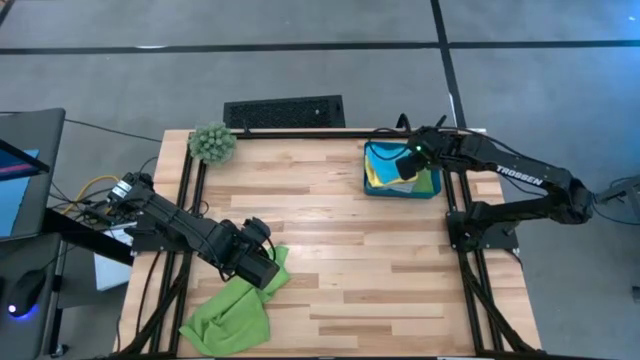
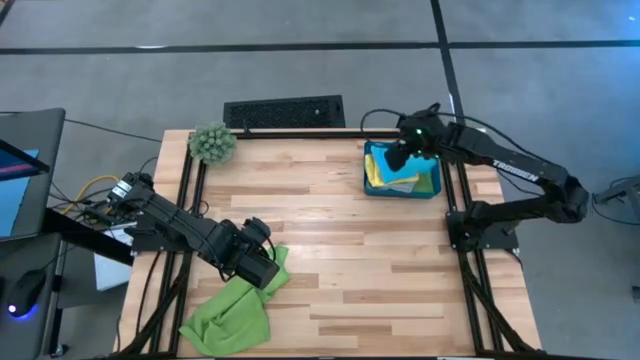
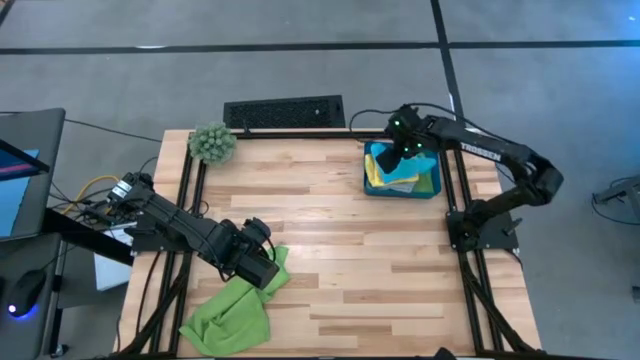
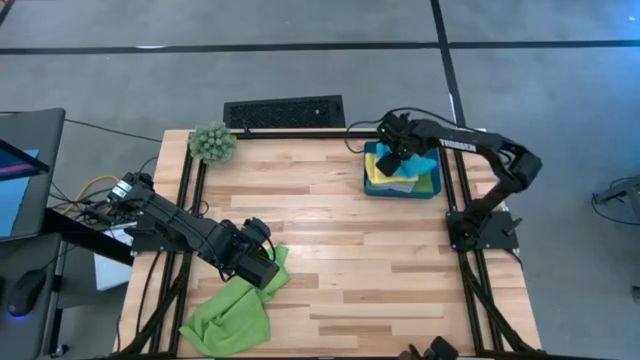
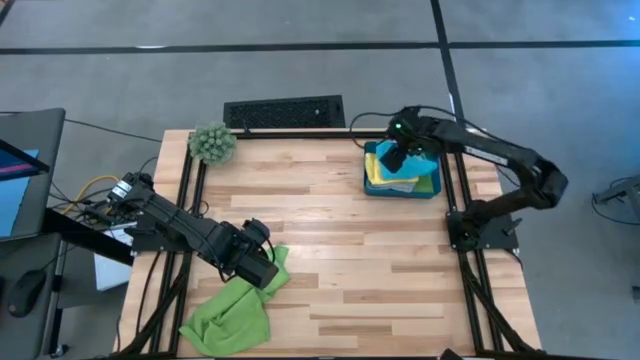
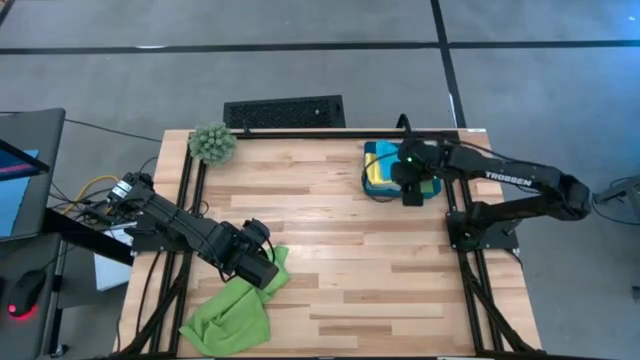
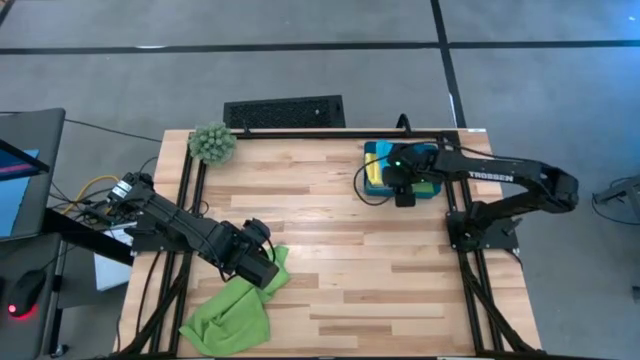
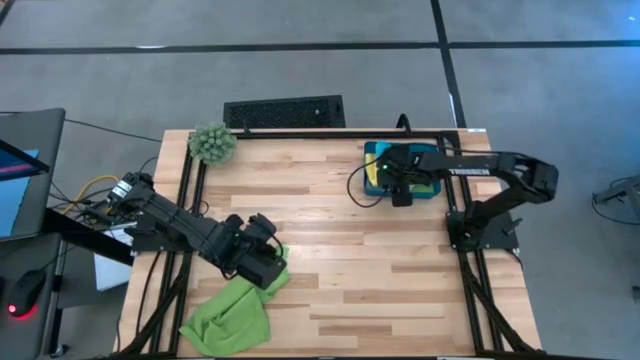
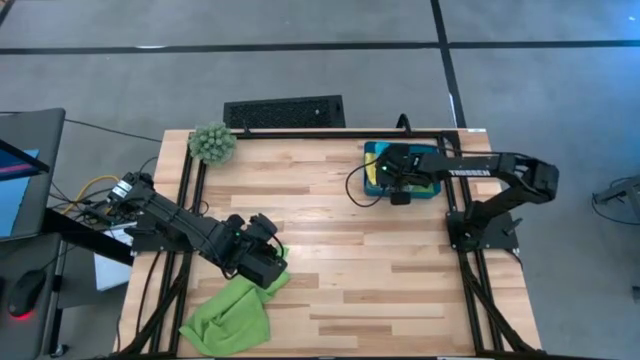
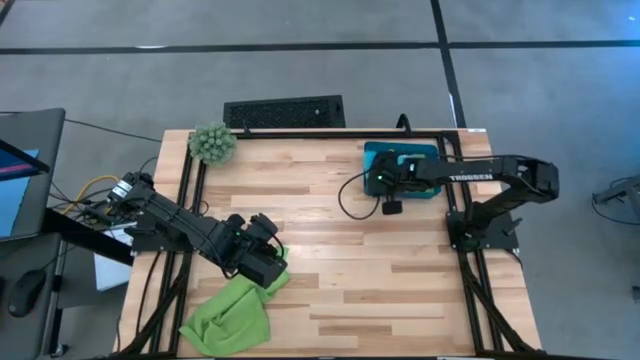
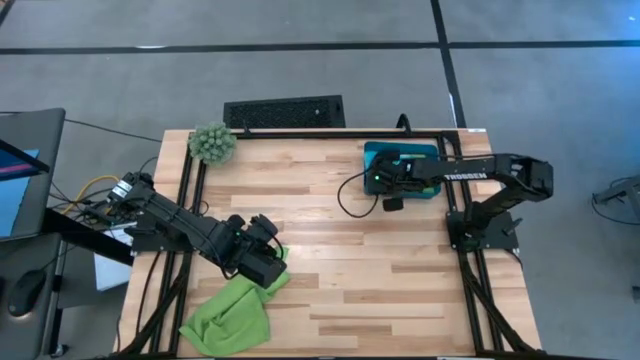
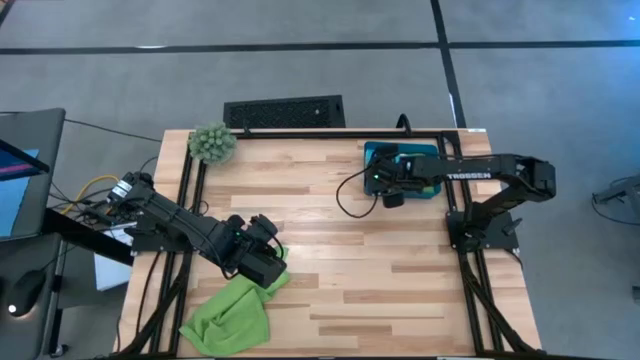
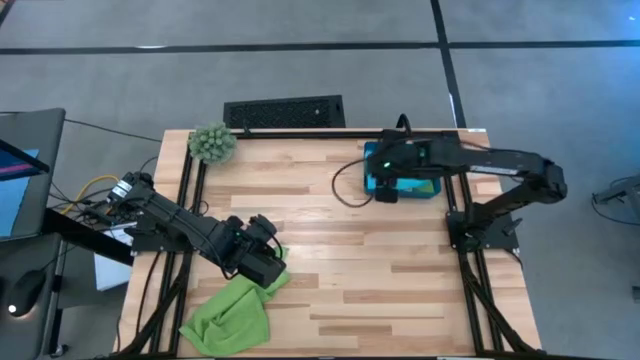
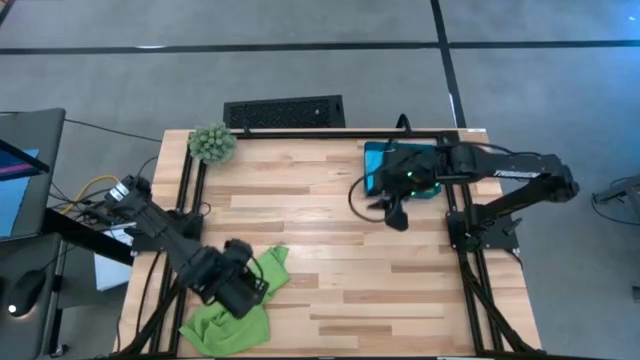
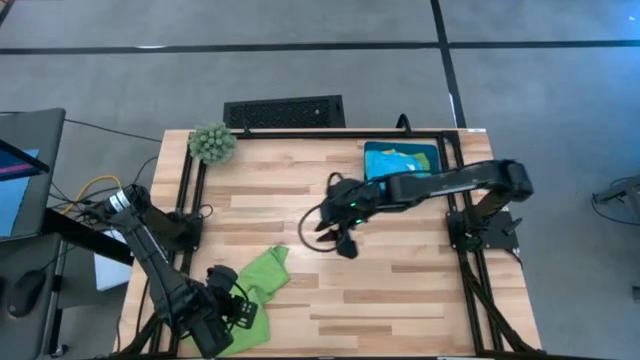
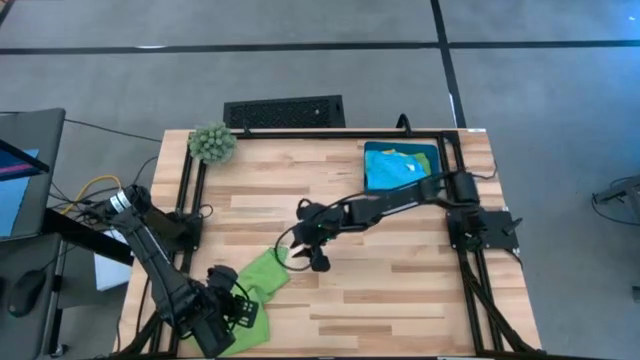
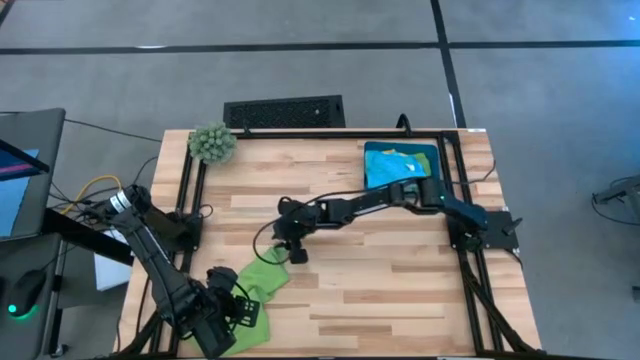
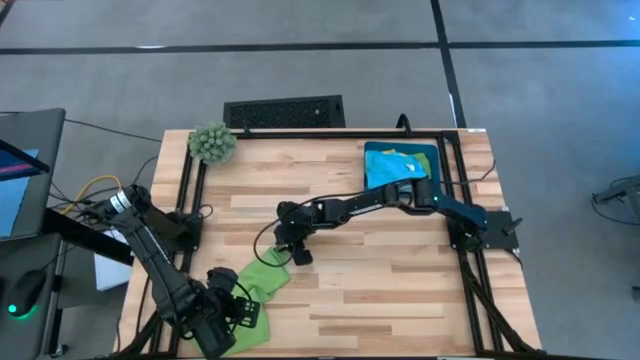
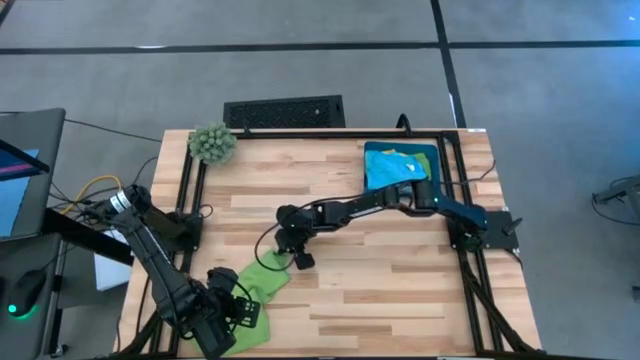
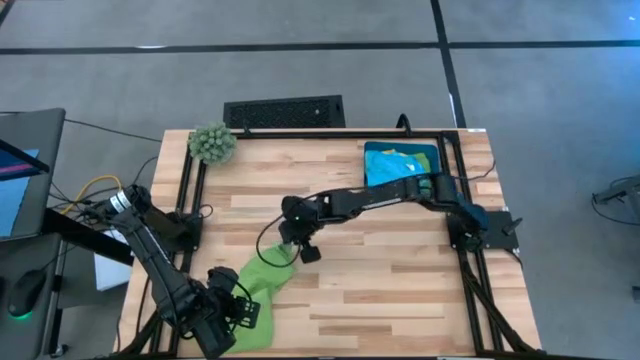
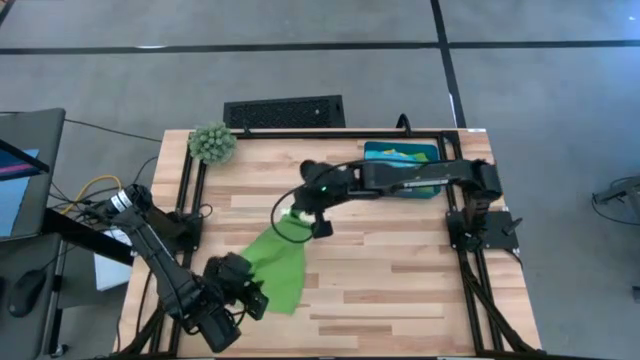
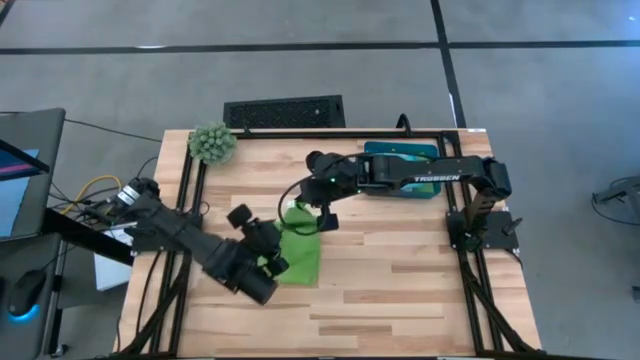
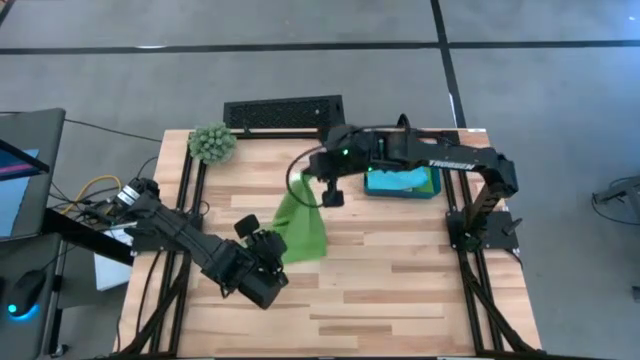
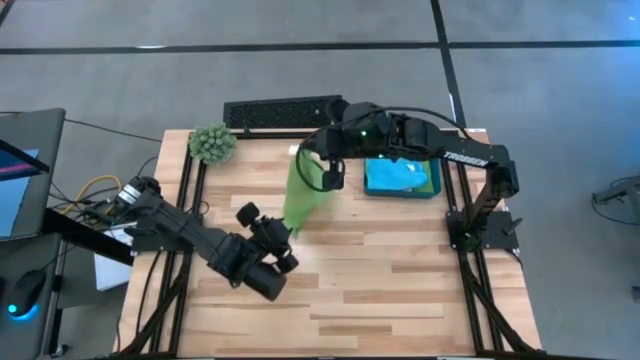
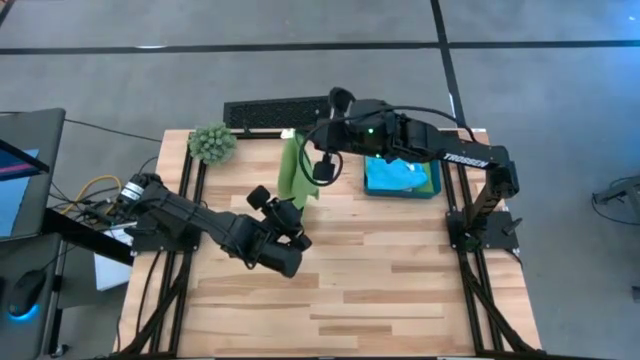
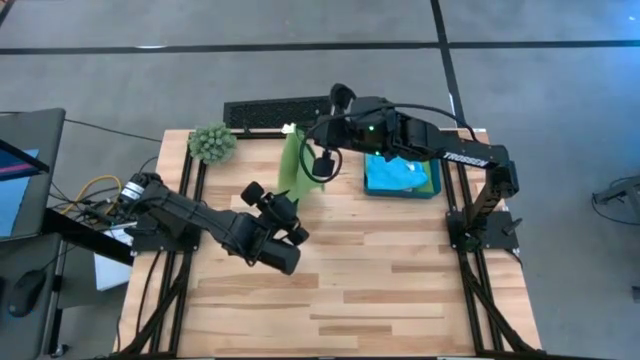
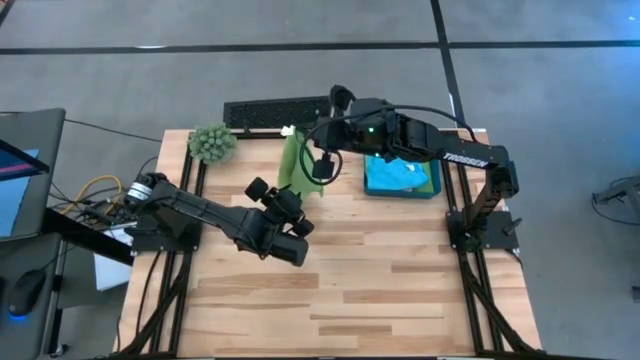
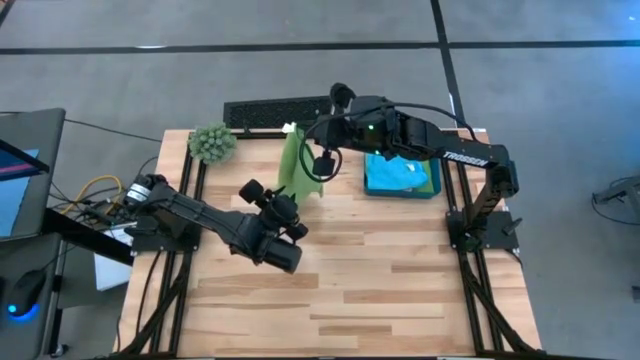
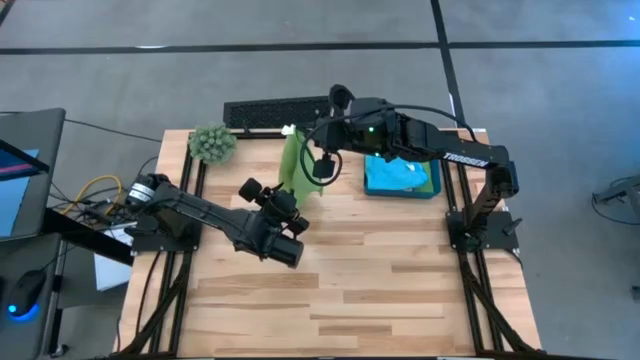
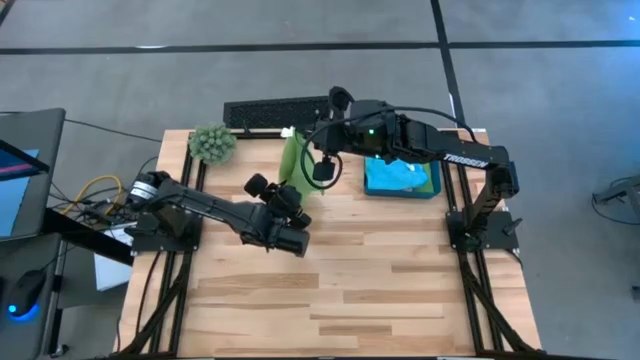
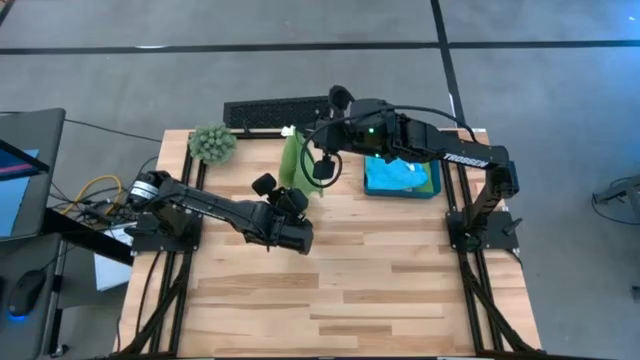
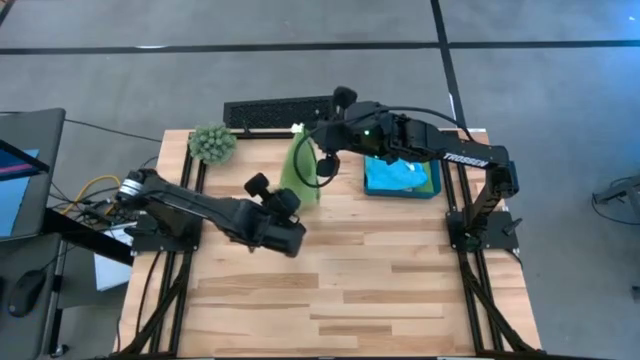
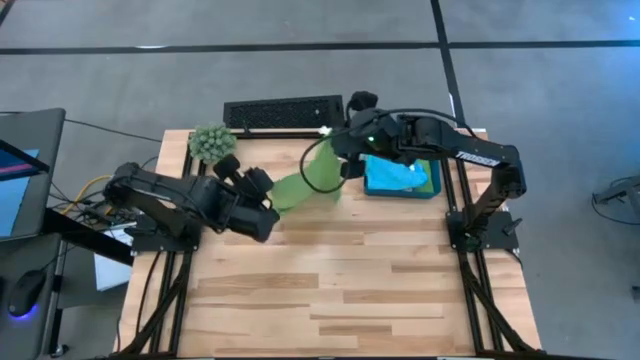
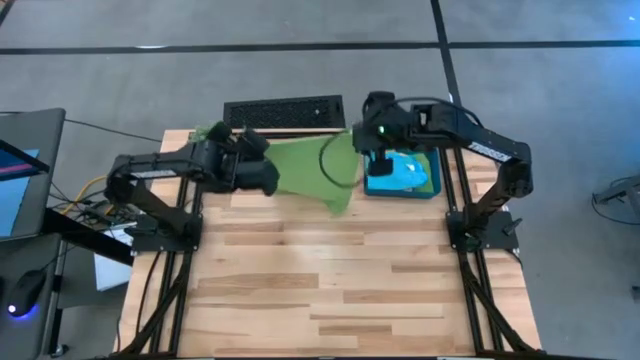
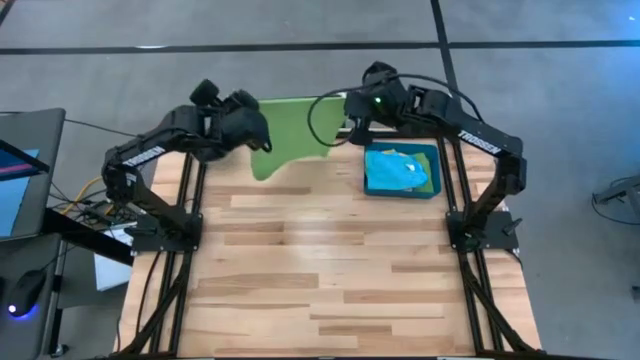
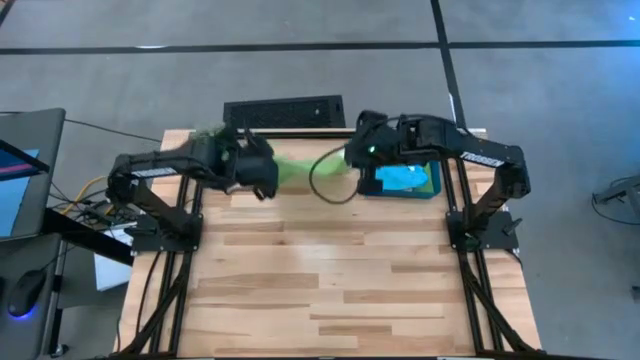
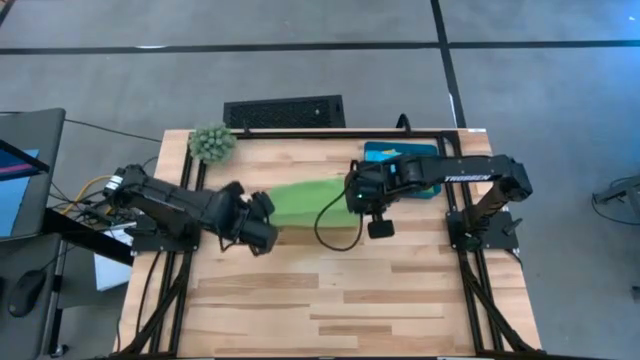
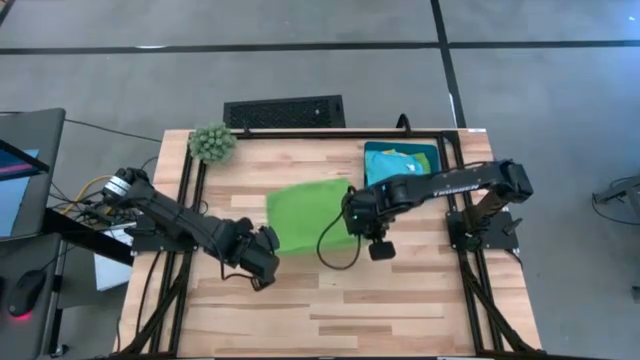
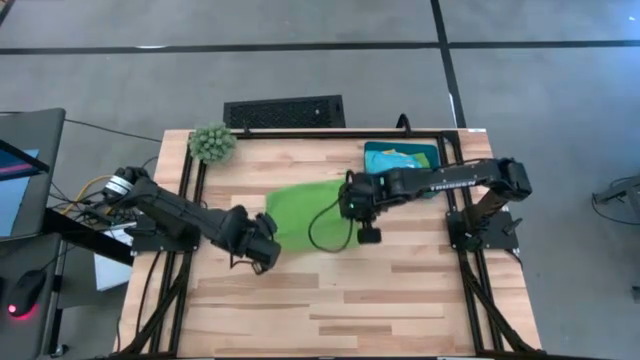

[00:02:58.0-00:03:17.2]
Task: Fold microfiber towels
Fold the green microfiber cloth

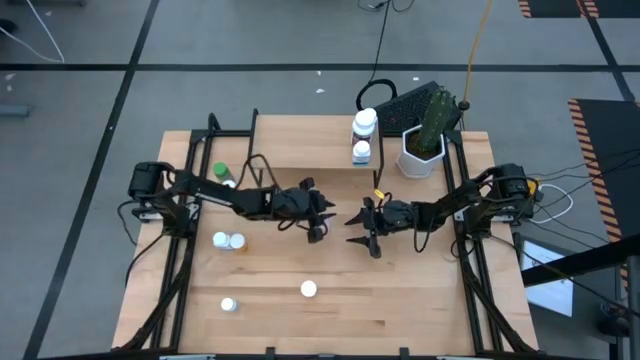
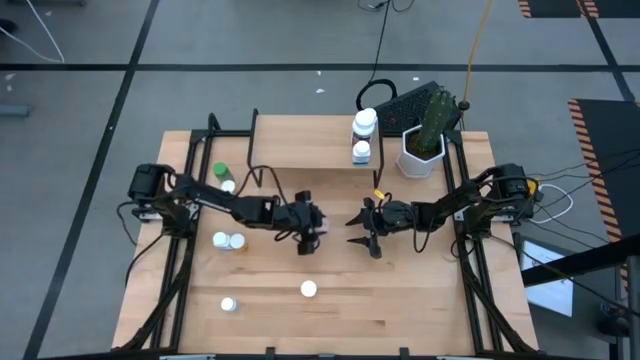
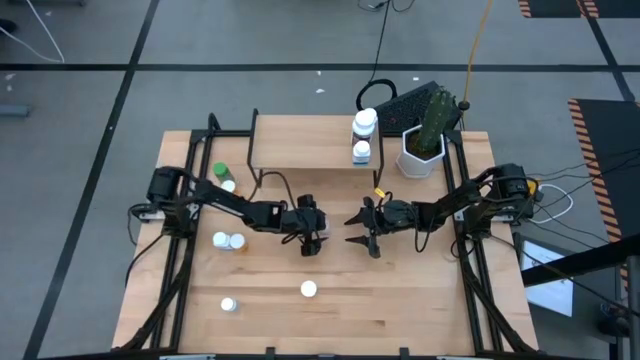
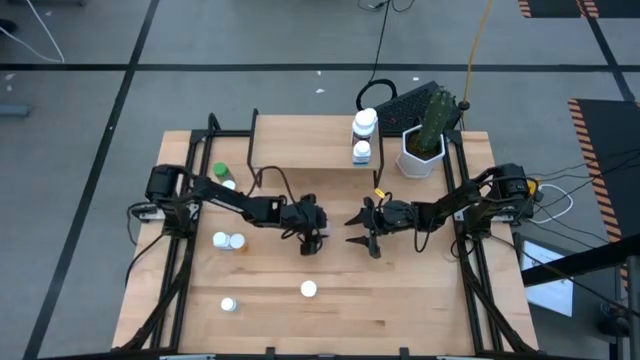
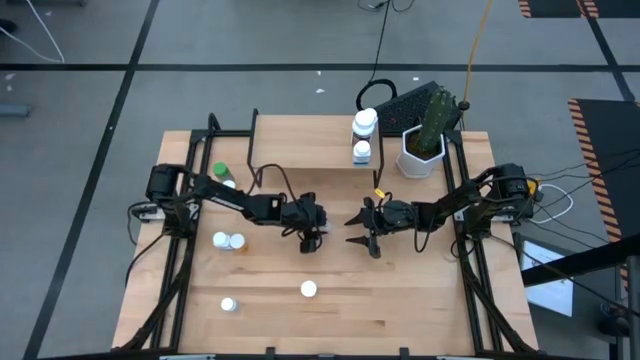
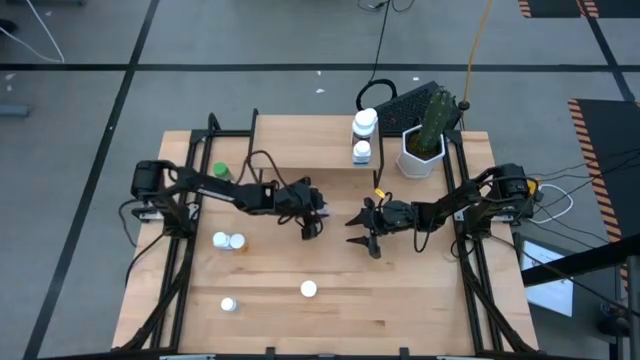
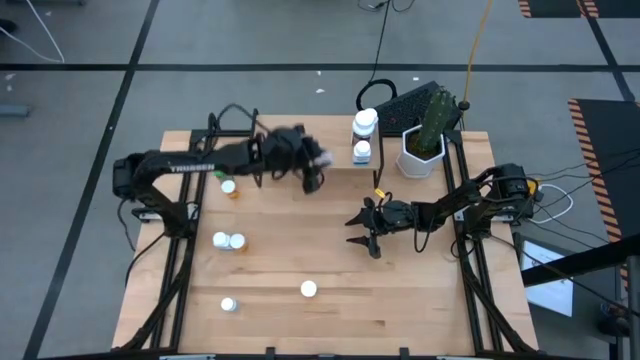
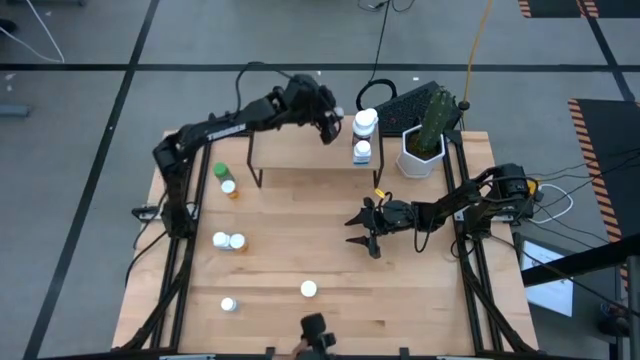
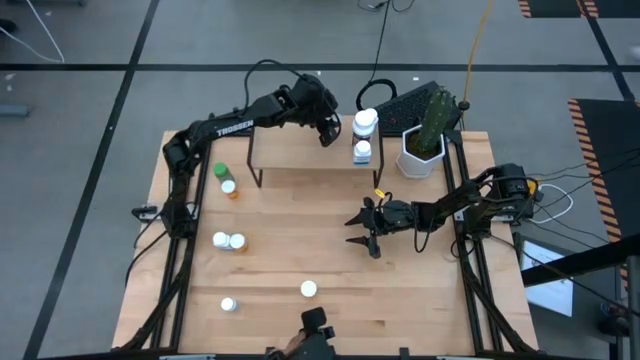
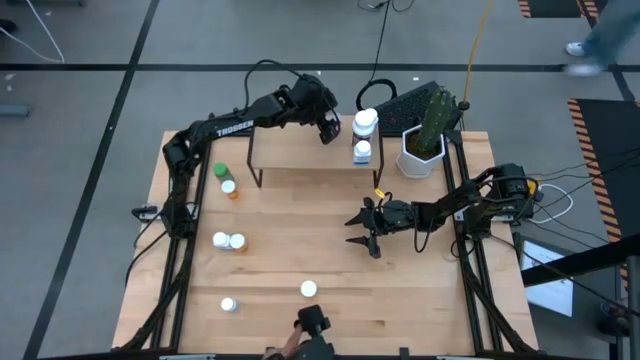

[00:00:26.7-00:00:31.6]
Task: Pick and place medicine bottles onto shelf by color
Put the transparent medicine bottle on the shelf
